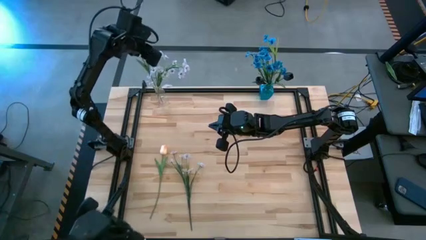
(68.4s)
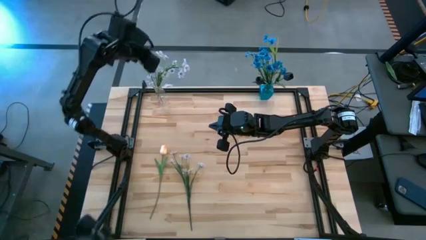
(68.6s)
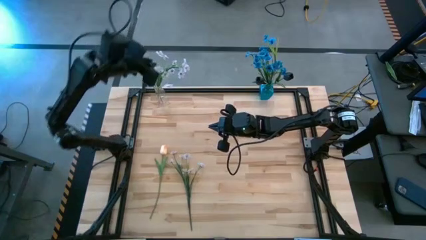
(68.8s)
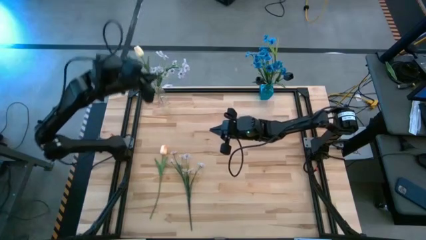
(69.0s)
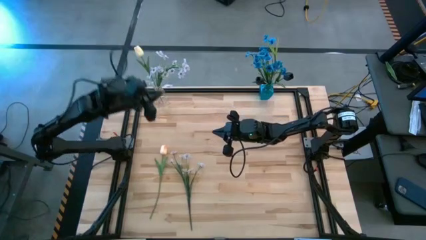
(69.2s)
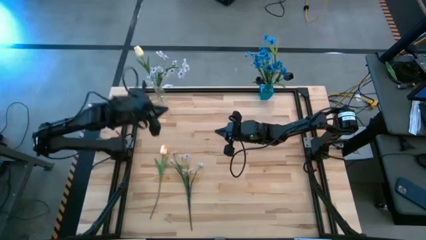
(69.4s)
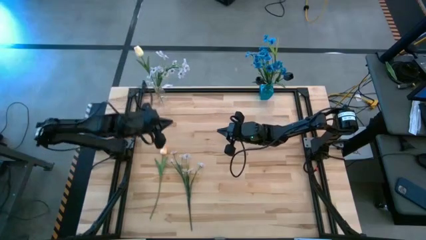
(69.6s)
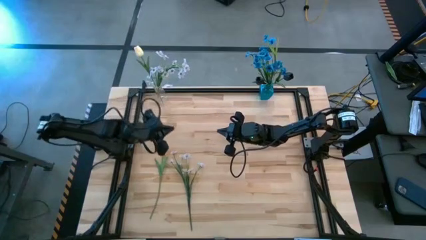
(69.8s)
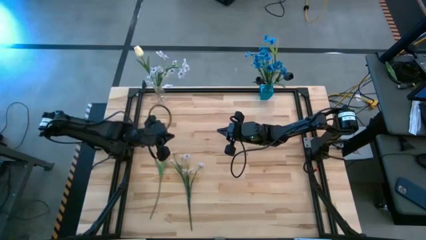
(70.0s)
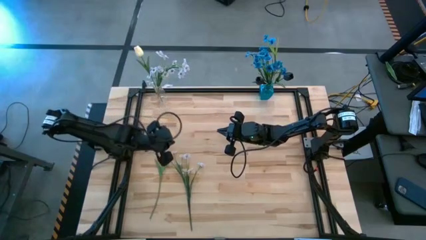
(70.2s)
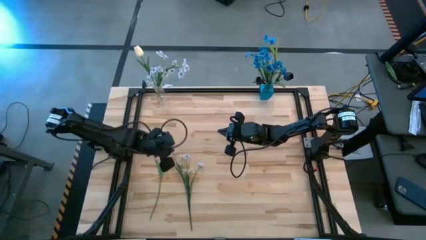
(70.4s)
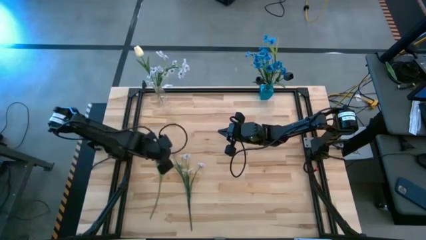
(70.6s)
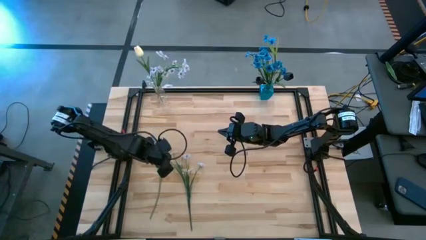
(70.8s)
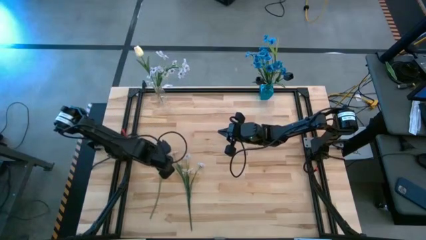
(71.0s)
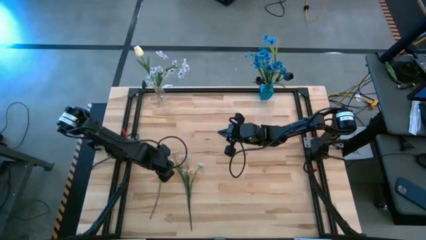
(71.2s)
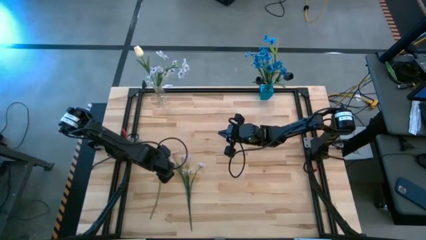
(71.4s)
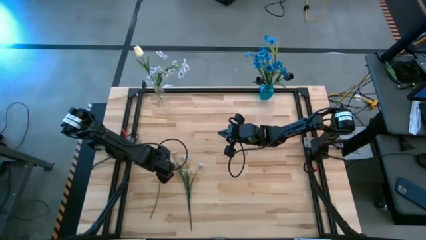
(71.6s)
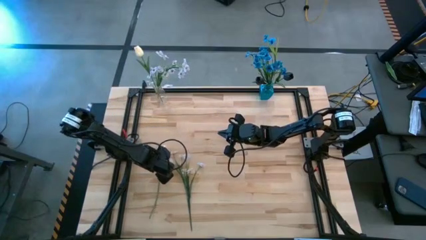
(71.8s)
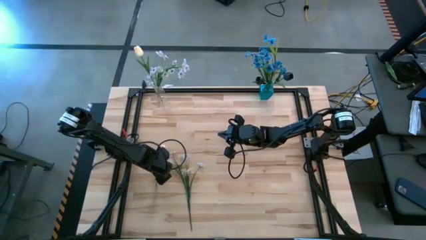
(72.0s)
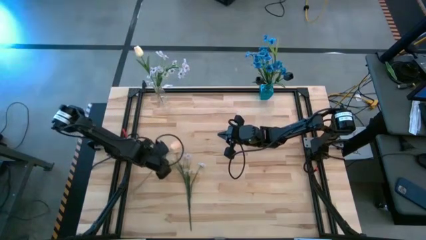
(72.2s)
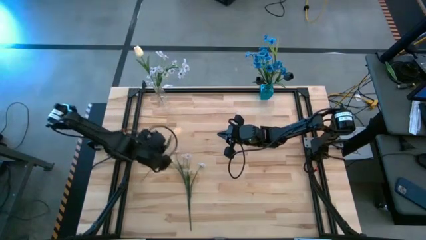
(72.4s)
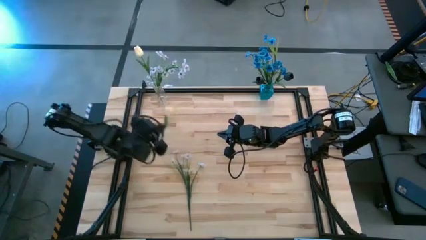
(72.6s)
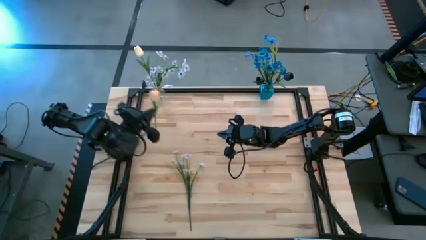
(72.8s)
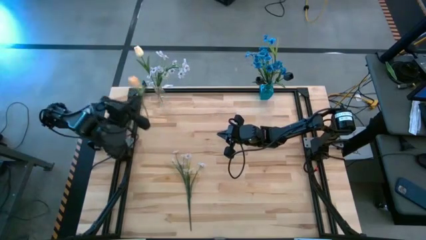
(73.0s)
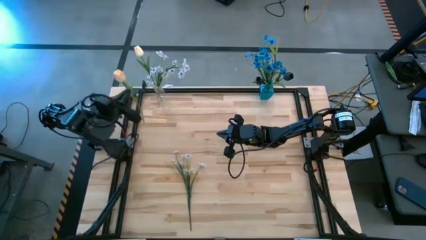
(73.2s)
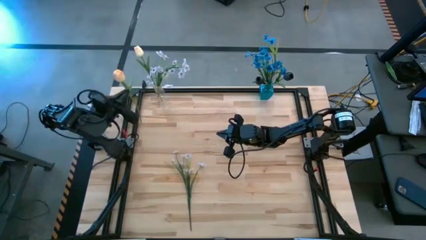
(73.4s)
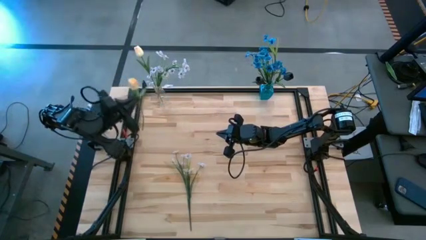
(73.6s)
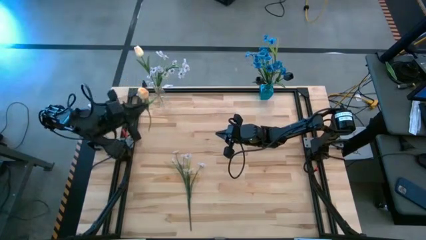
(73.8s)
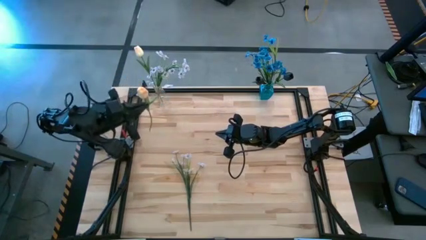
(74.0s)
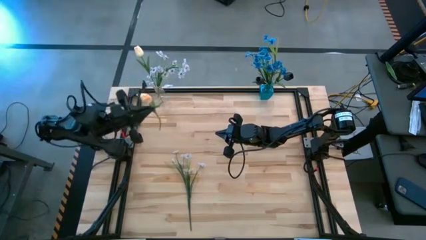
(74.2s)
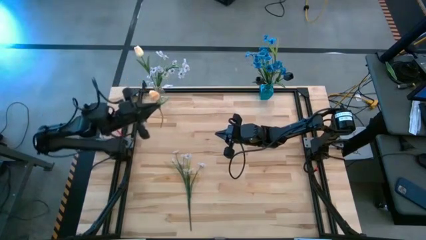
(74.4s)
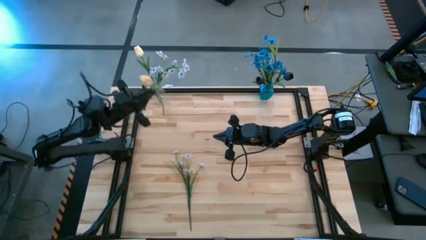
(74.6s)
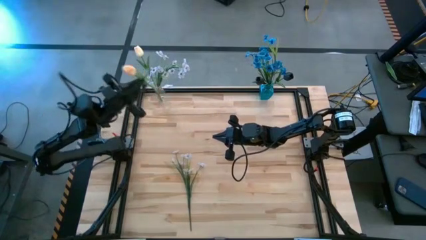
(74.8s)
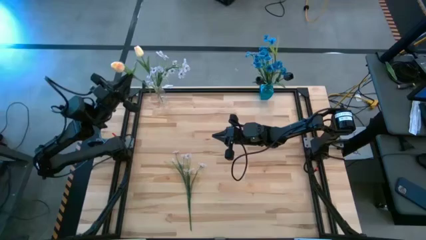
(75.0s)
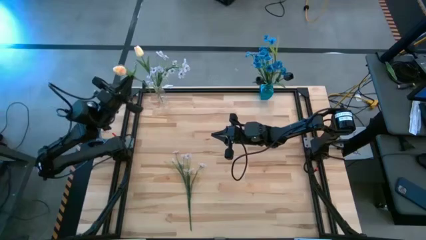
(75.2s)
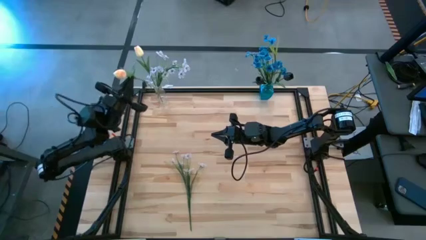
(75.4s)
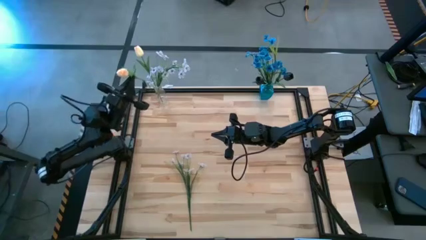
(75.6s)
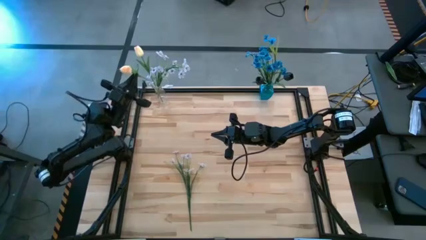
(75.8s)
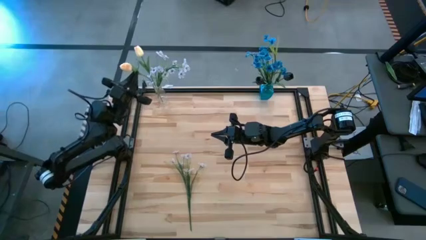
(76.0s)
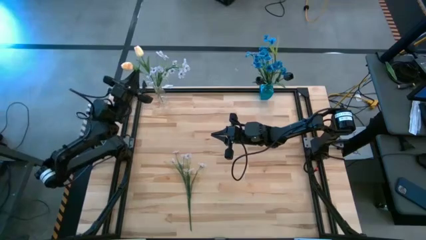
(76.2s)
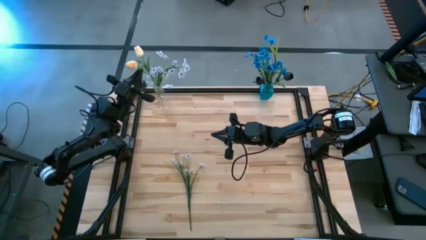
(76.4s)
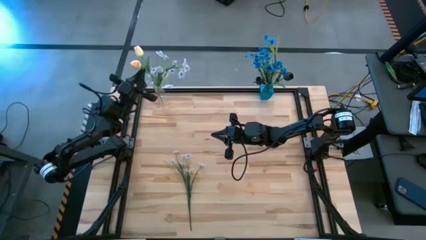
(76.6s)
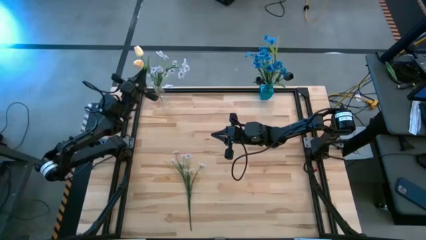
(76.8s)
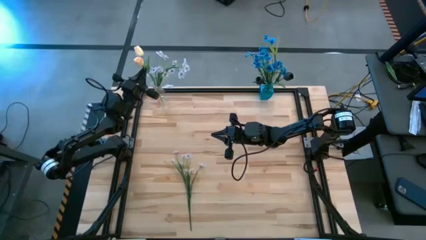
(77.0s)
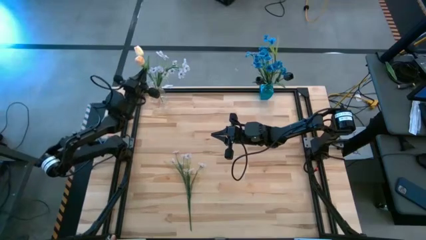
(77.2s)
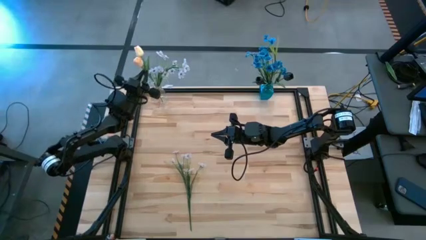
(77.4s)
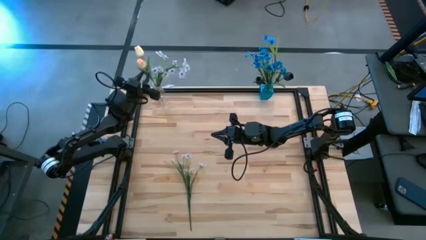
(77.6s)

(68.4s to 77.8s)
Task: Sort flowers into vase by color
Put the yellow flower into the transparent vase

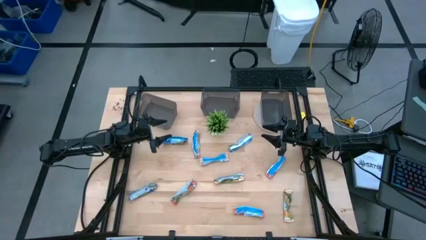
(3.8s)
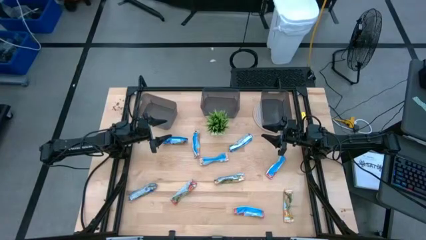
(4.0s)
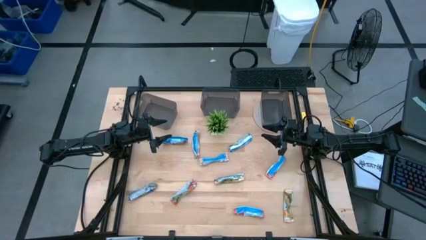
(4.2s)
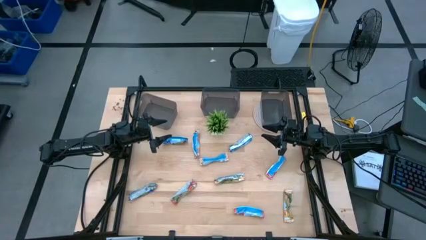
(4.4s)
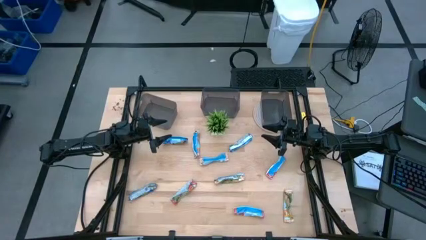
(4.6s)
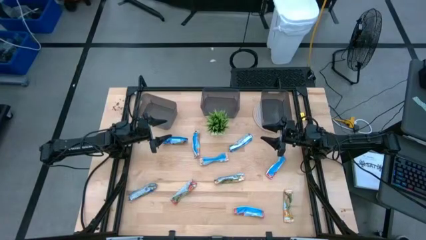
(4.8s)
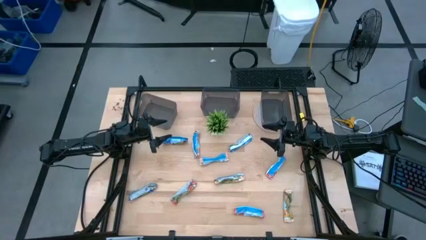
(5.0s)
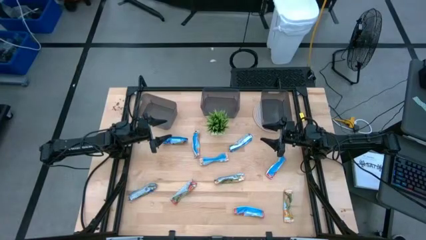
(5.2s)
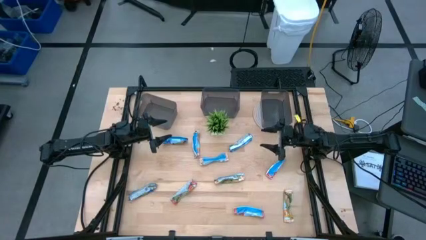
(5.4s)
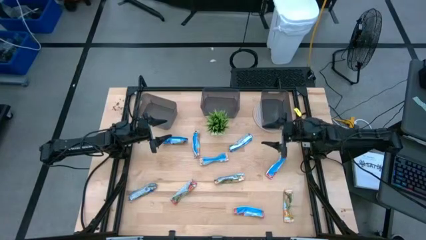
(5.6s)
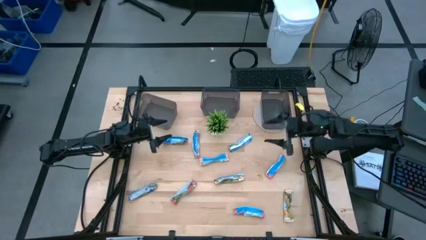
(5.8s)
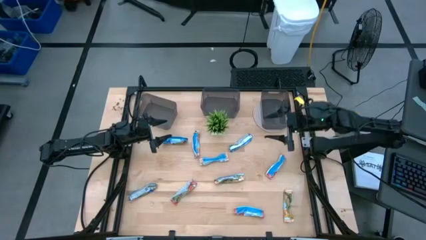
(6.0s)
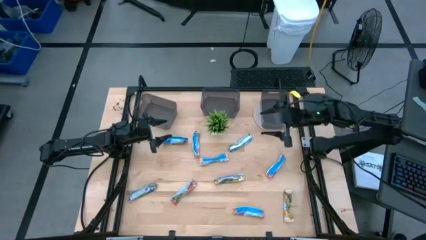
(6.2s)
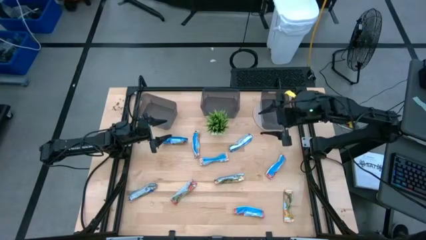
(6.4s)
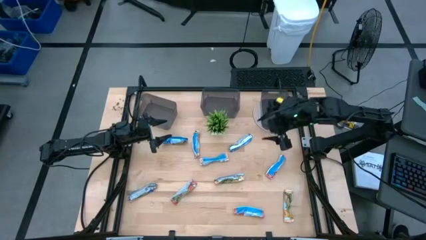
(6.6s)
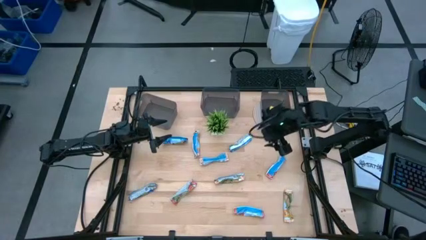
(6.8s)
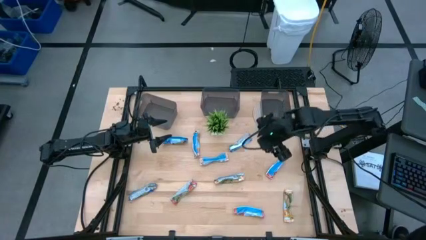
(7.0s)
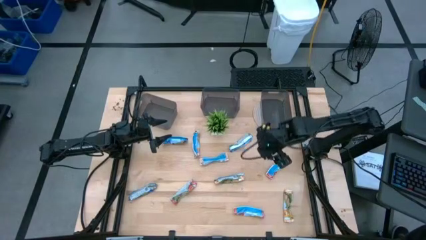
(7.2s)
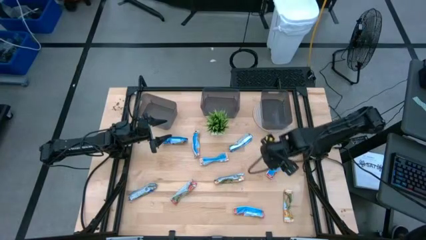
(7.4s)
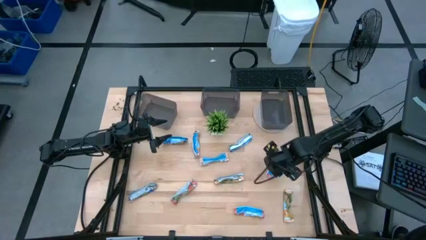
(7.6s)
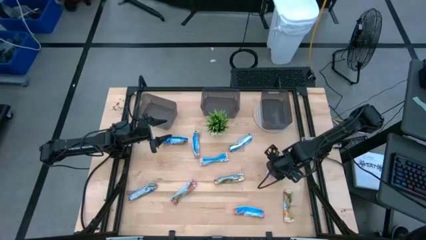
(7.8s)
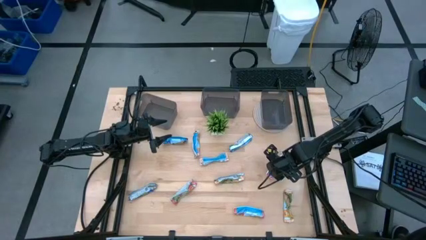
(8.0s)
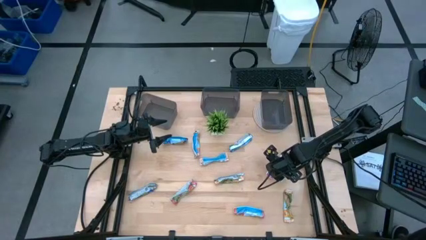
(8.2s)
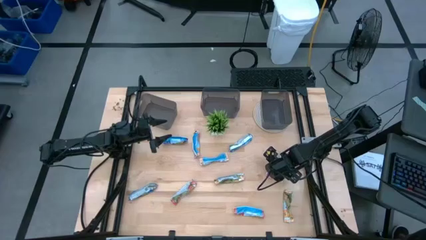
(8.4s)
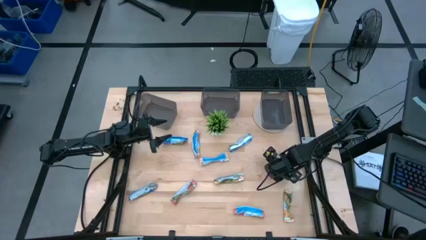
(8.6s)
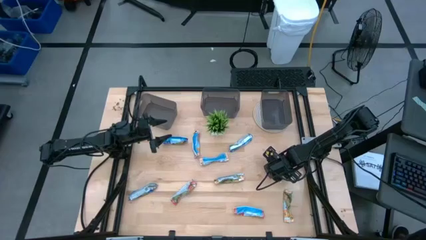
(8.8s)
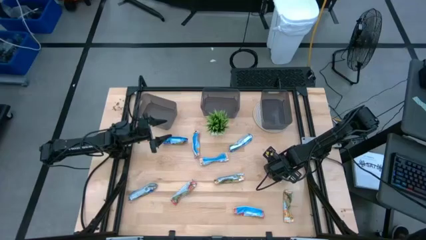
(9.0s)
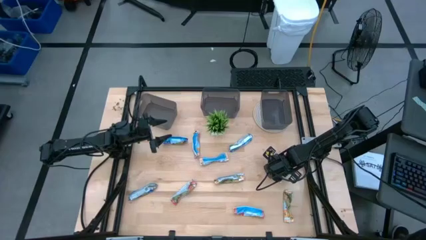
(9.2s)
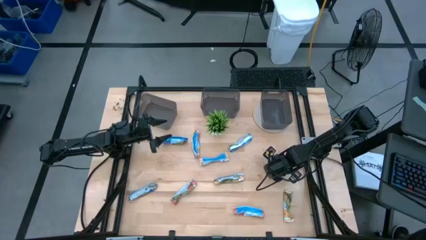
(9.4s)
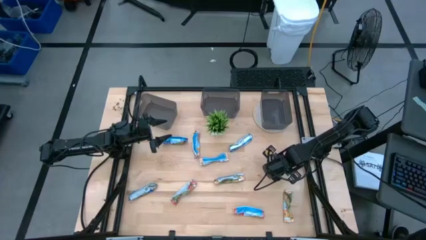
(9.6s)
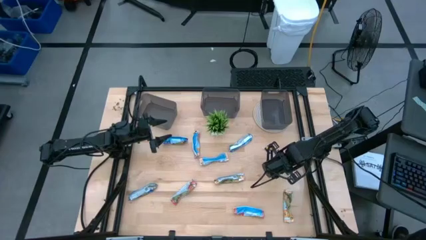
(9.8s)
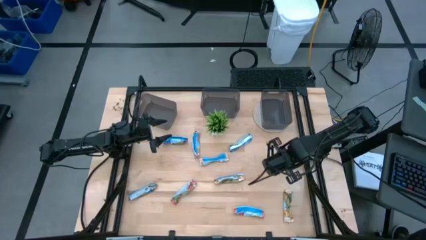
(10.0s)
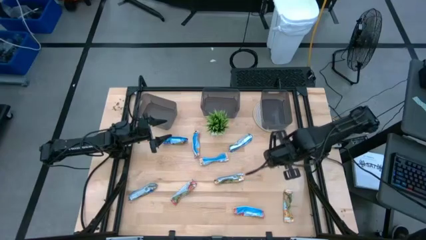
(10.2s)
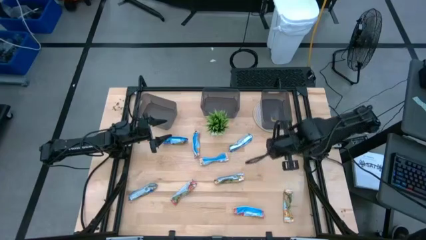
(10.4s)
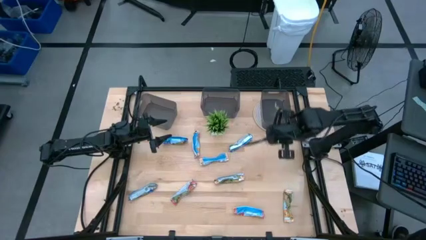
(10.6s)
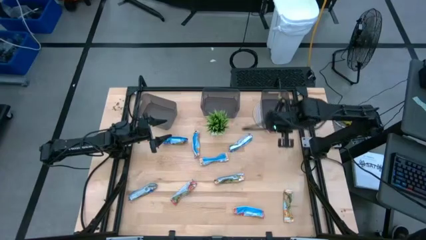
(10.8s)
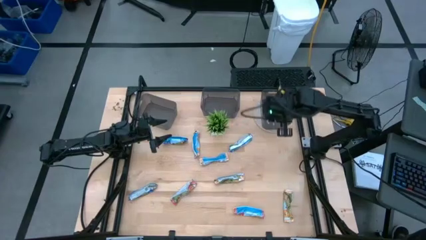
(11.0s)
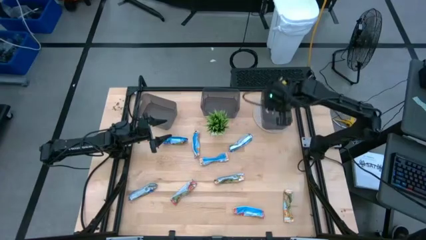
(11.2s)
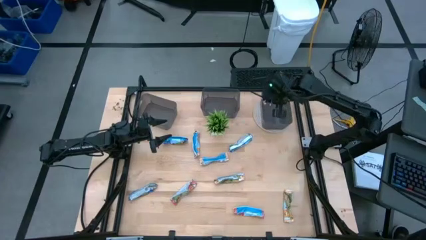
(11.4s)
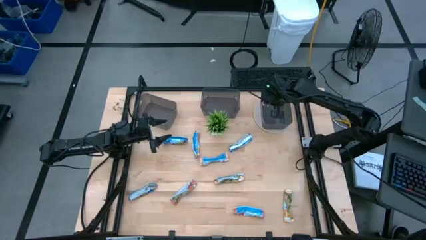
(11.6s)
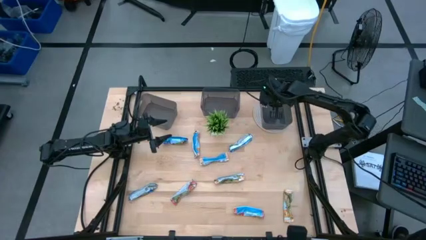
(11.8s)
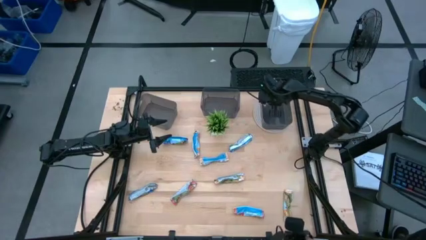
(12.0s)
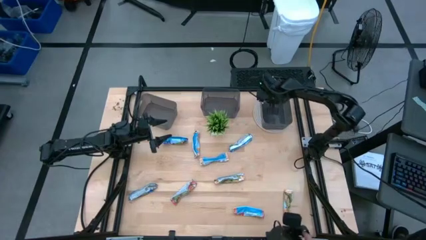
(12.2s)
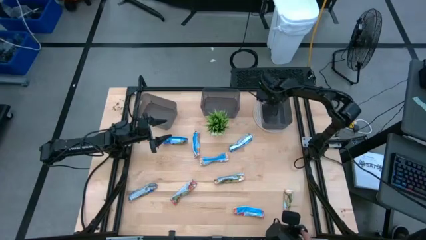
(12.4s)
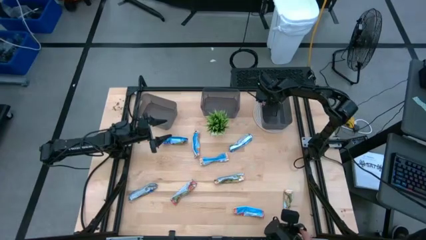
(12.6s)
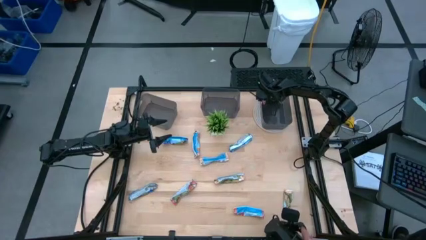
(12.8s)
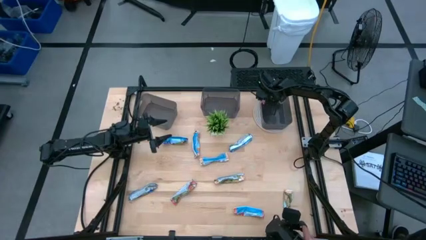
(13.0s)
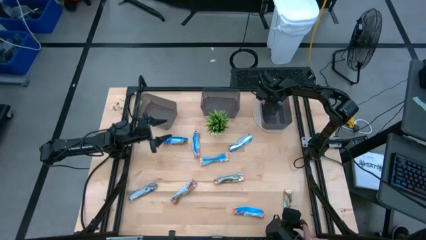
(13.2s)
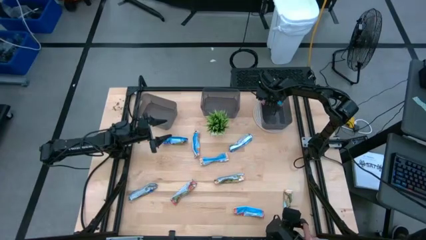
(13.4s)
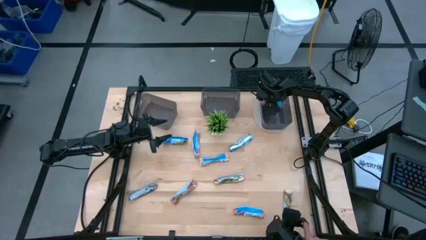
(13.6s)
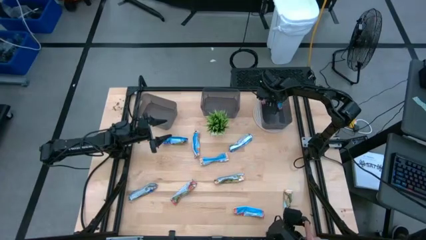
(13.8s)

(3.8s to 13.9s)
Task: Pick and place Granola Bars by type
Put the red granola bar into the right black bin
